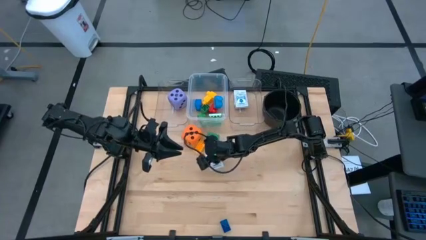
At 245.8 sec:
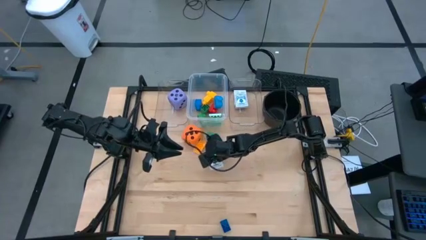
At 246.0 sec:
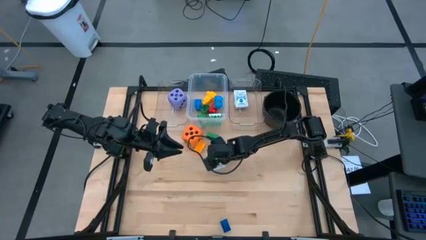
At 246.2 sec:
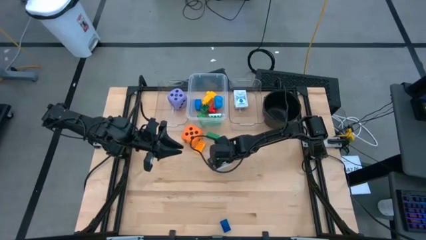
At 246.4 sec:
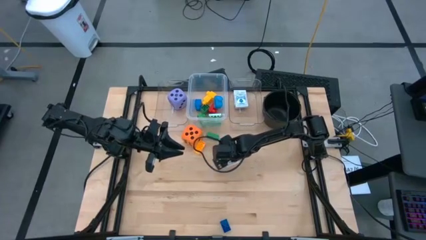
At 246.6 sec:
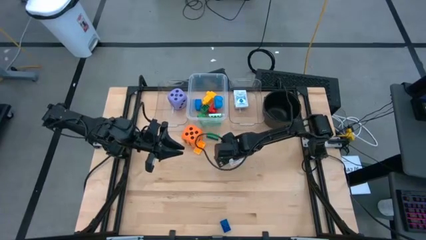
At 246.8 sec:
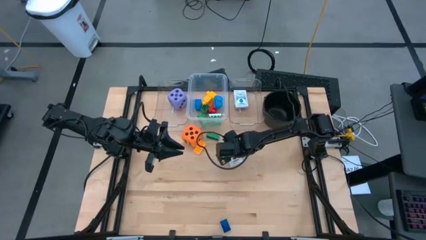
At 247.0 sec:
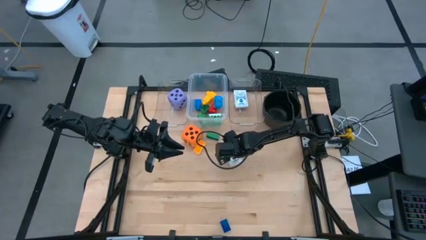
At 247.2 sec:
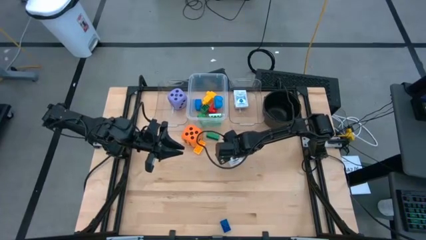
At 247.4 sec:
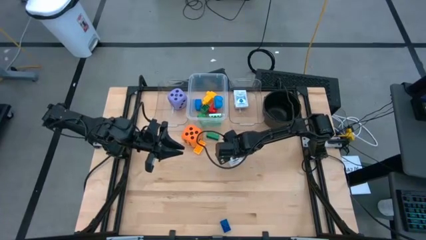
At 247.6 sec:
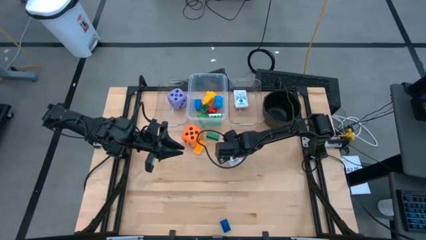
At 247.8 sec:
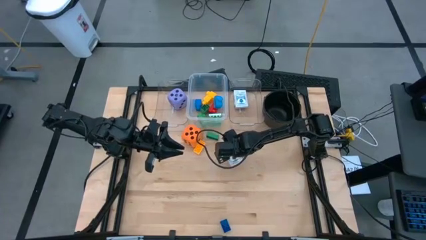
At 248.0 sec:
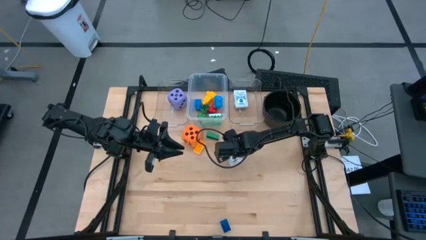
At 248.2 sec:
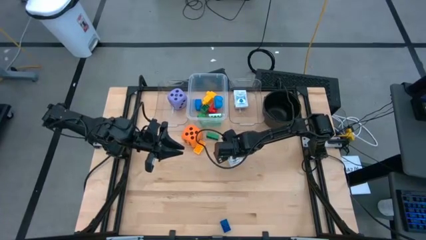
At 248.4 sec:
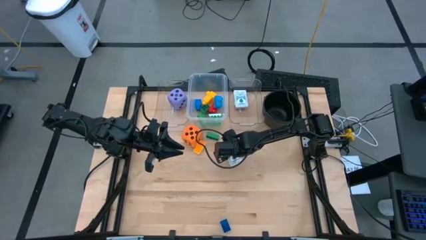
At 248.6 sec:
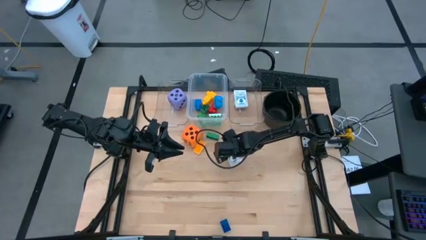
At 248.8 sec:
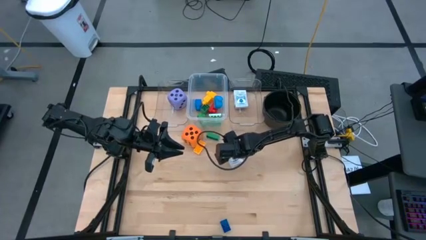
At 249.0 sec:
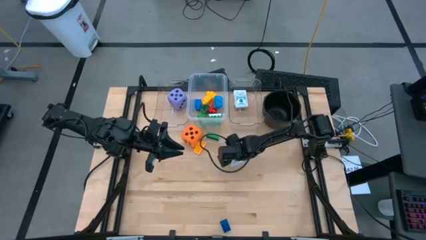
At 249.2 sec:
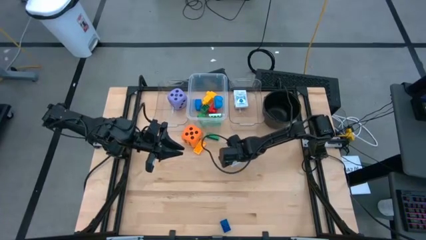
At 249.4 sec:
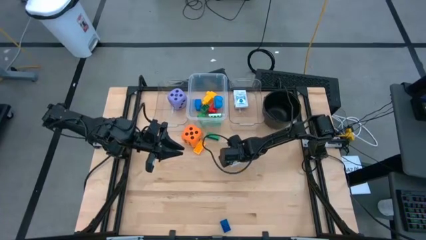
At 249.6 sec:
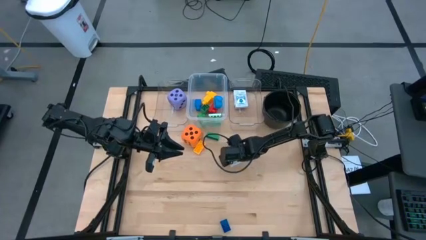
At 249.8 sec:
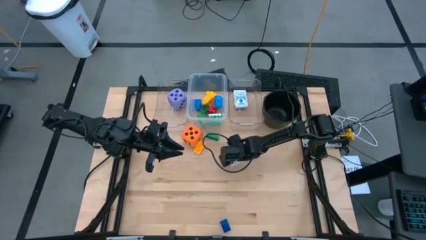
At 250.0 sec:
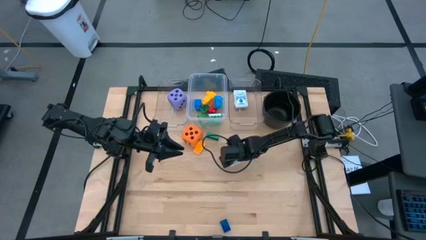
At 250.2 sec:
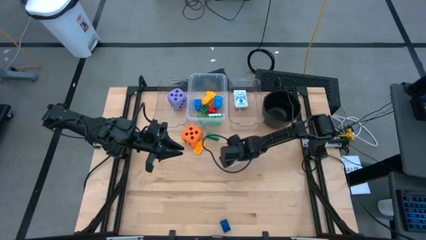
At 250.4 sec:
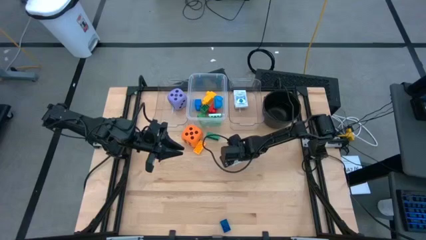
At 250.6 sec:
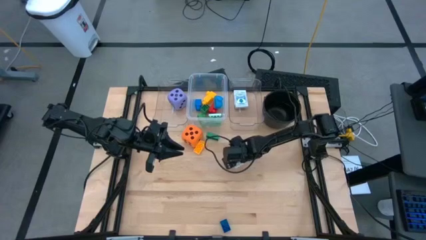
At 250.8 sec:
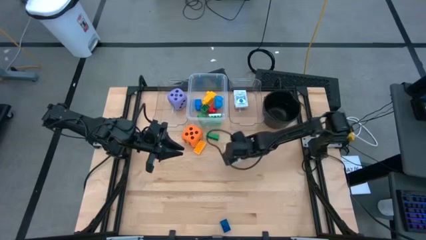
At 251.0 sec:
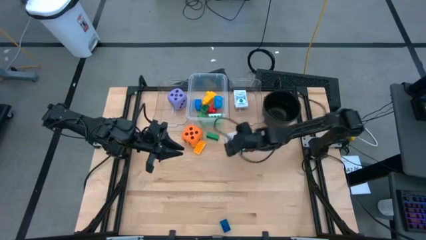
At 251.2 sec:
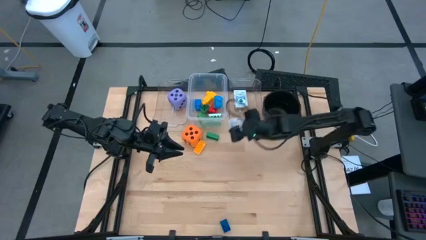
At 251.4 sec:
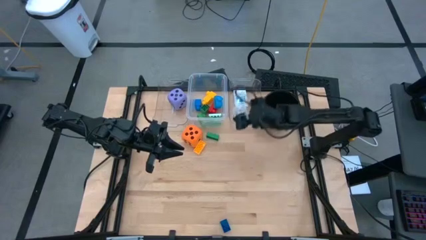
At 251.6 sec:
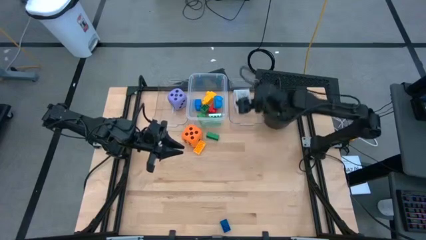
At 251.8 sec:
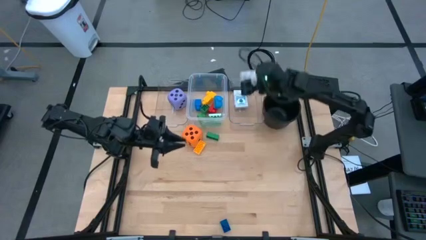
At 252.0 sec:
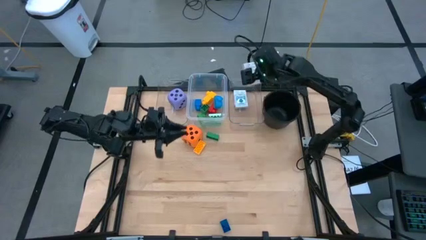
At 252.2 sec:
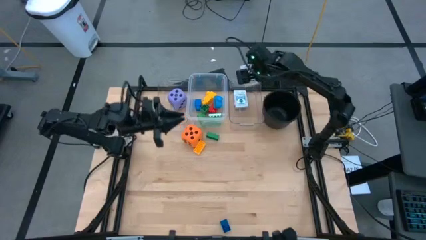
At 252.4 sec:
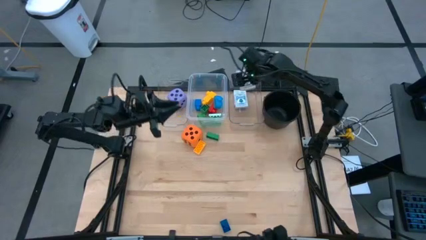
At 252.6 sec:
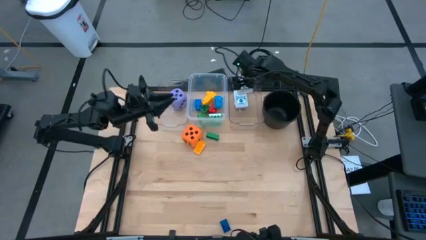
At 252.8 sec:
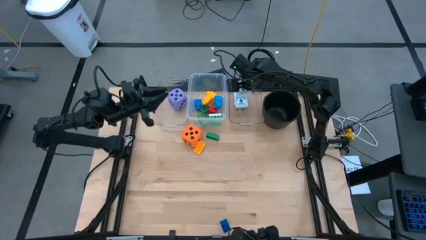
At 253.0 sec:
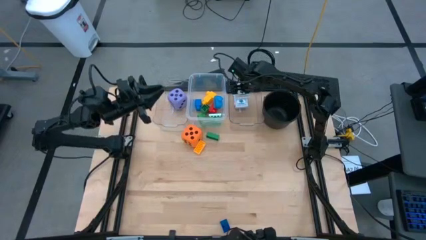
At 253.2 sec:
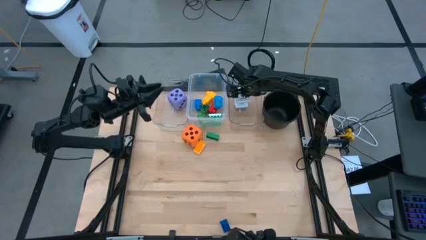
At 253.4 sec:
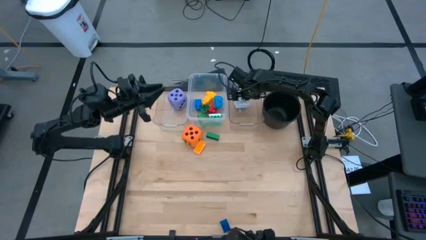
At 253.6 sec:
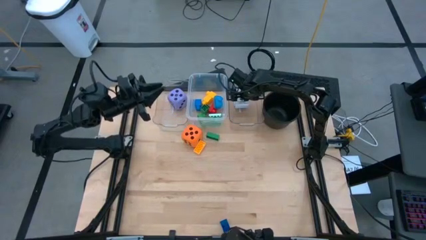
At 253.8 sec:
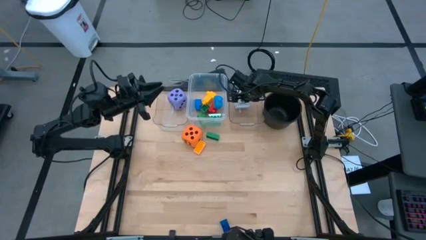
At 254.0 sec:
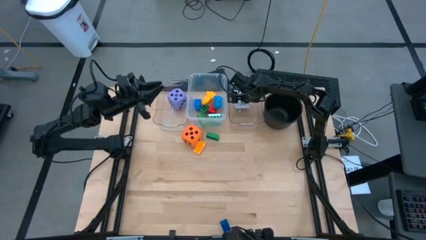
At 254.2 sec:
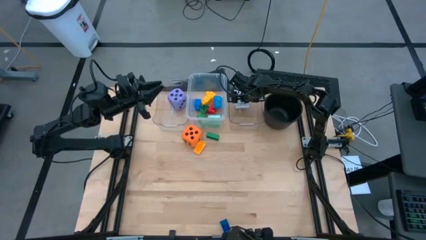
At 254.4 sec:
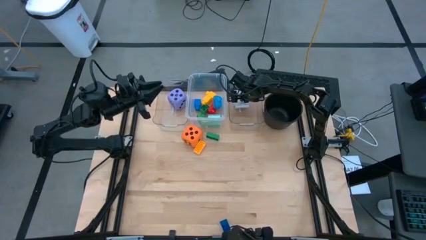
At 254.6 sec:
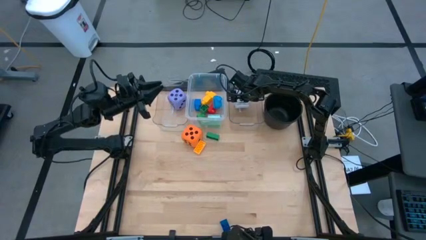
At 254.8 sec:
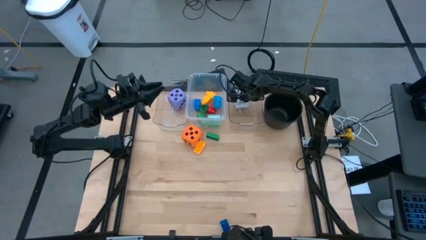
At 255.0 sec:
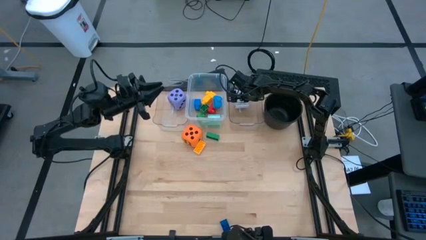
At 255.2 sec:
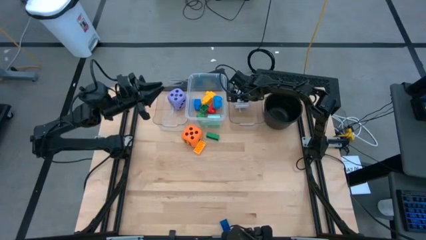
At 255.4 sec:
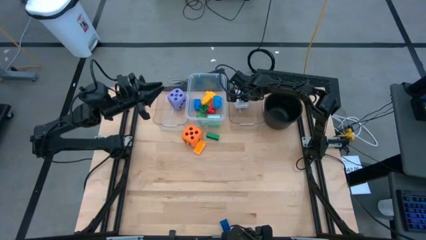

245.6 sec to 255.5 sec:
Task: Pick & Place Toys
Put the black playing card box into the right transparent bin

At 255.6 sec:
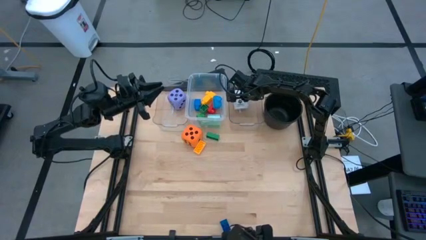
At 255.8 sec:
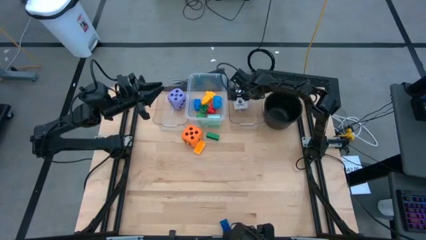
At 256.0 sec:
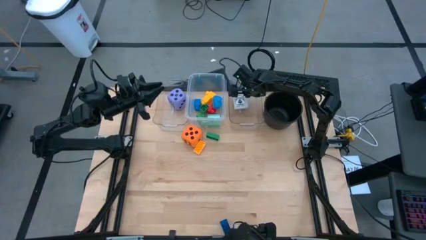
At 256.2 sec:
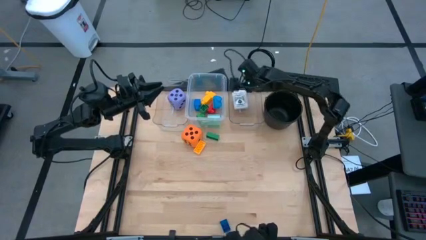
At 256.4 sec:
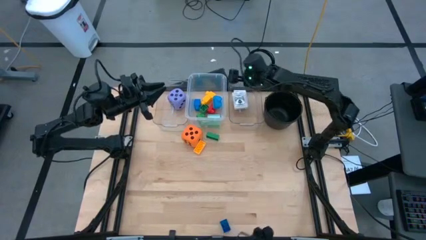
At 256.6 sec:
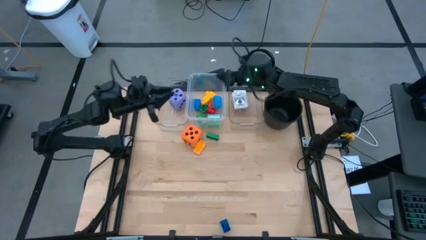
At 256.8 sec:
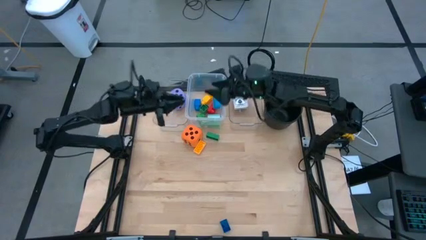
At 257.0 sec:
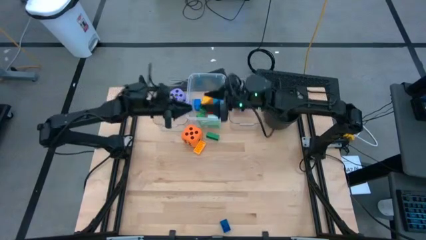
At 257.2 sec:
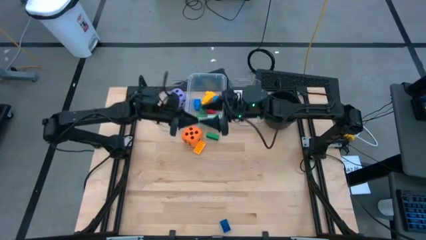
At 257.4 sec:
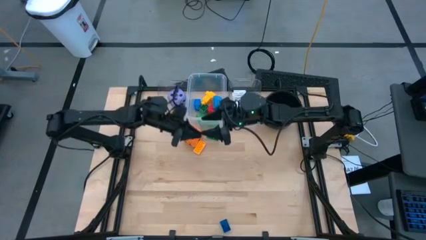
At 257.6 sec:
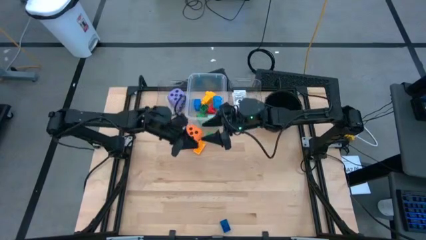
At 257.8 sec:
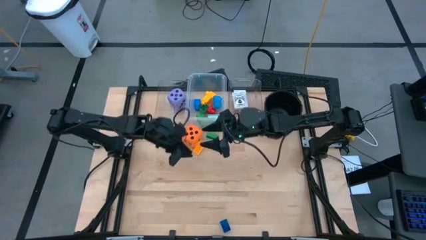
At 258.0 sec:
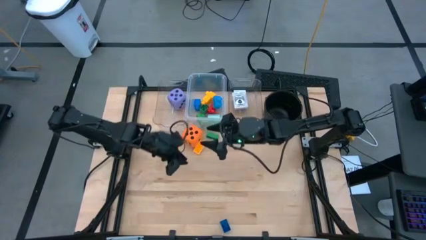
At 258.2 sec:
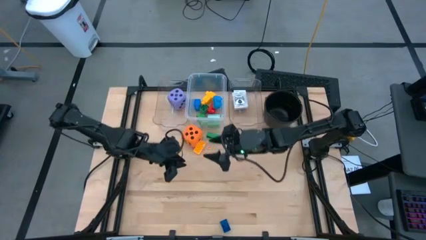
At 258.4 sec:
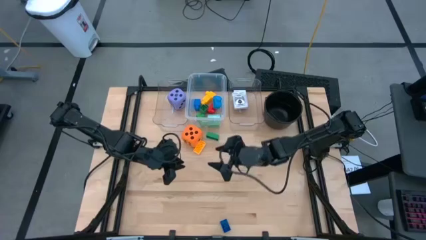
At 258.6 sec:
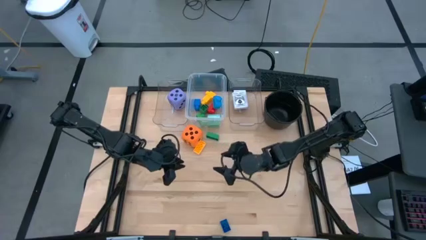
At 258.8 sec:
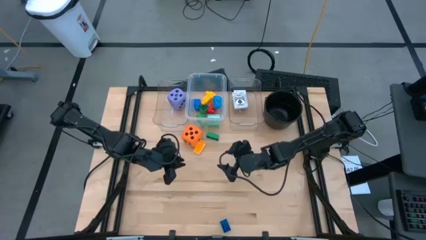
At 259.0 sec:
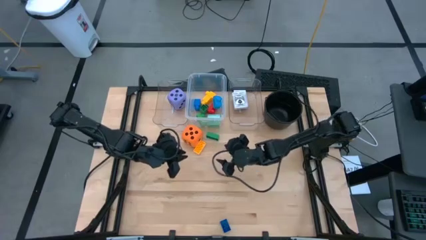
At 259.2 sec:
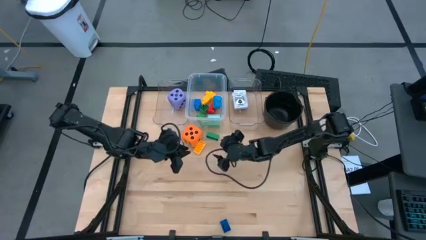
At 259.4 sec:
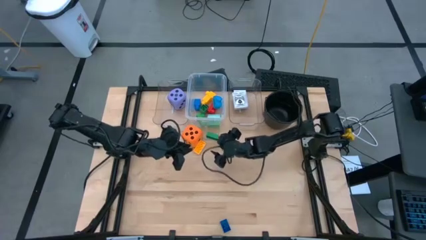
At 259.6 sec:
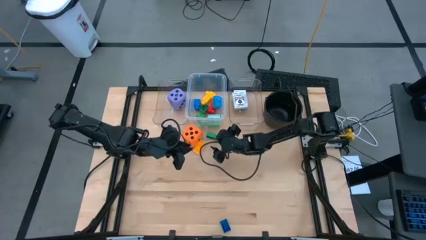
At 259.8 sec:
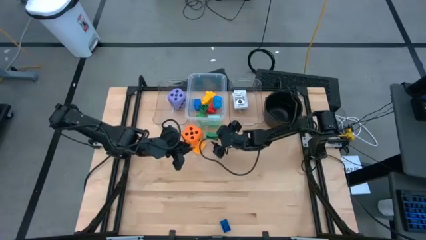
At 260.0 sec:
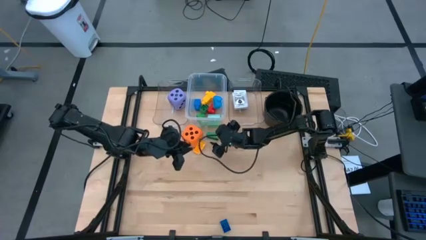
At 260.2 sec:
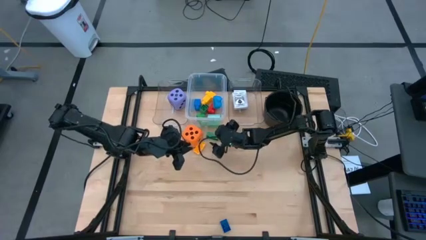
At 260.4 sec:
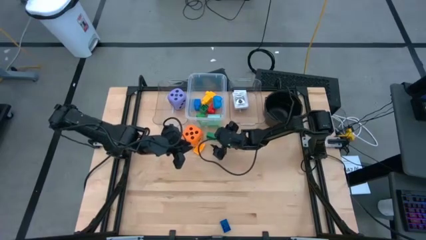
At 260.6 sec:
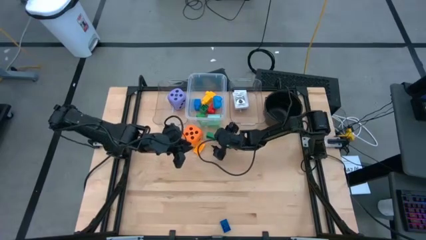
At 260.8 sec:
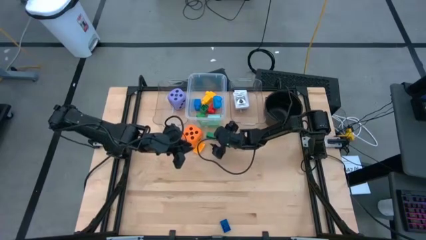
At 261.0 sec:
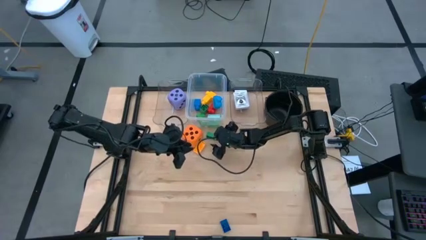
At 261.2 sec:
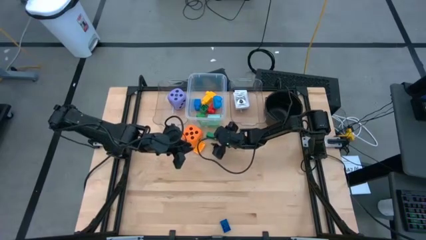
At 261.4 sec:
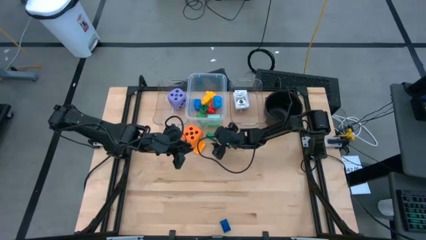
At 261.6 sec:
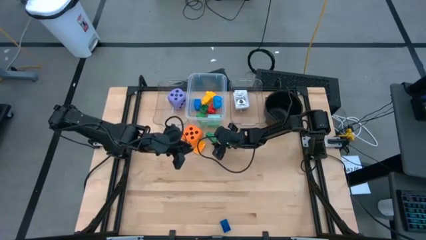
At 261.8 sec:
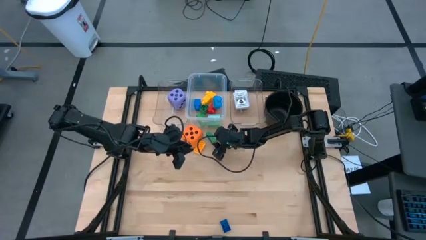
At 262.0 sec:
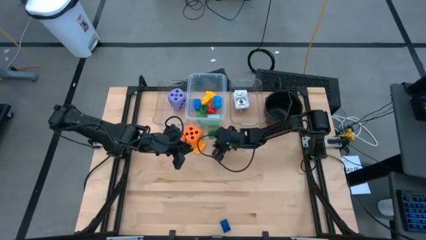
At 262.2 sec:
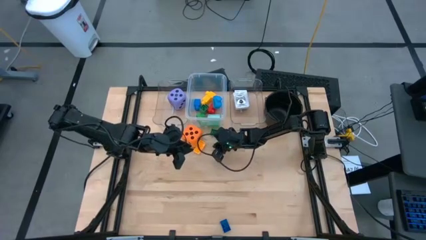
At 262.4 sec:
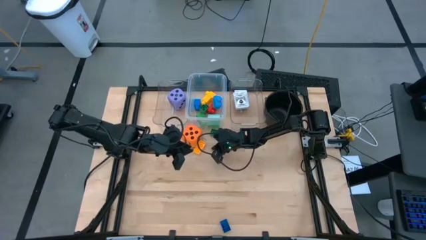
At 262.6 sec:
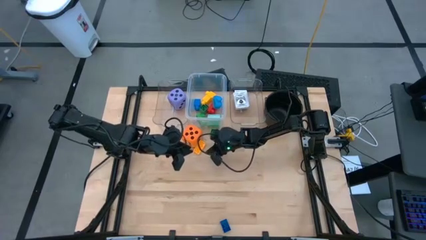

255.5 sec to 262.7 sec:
Put the green eight stud game piece into the middle transparent bin
